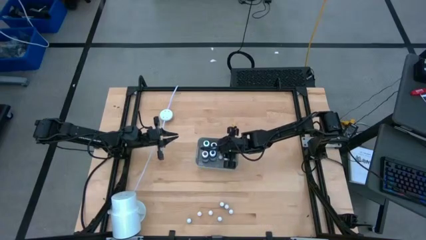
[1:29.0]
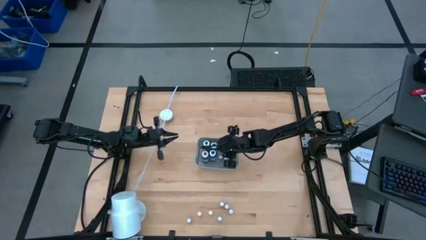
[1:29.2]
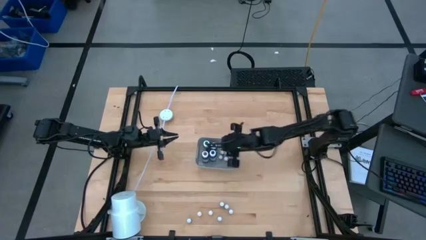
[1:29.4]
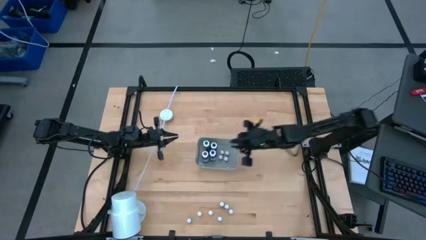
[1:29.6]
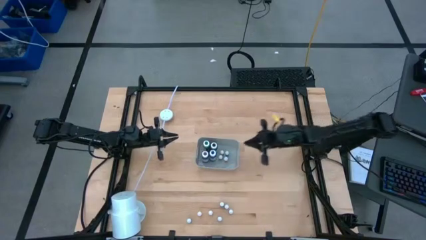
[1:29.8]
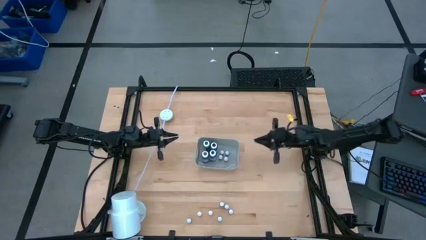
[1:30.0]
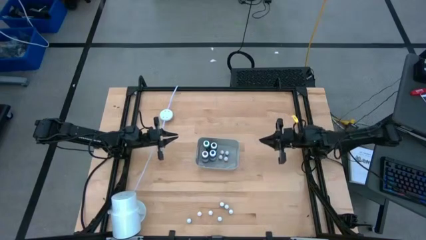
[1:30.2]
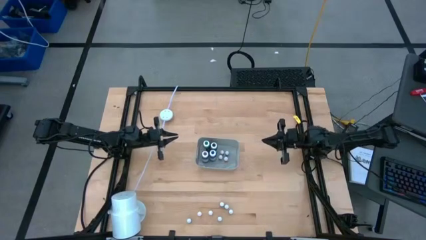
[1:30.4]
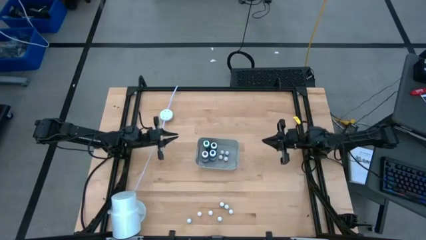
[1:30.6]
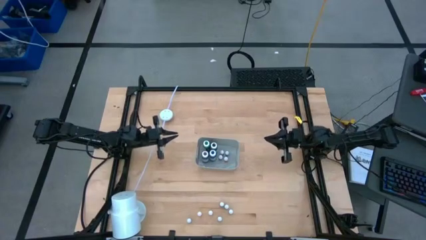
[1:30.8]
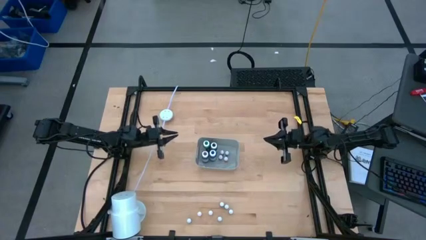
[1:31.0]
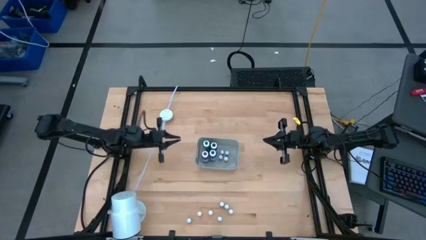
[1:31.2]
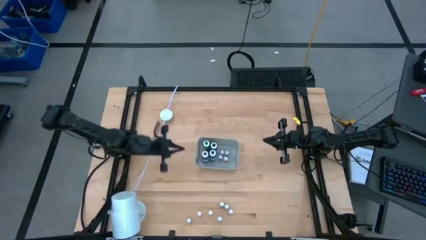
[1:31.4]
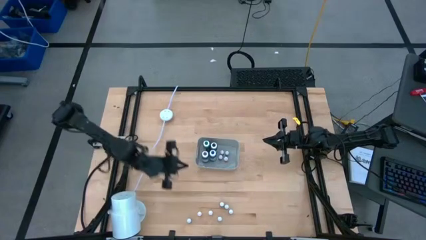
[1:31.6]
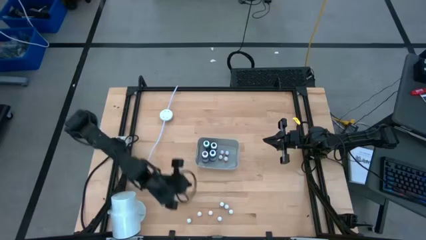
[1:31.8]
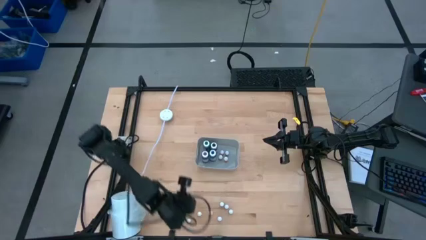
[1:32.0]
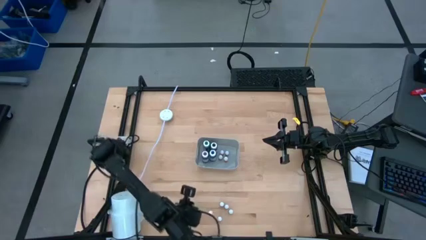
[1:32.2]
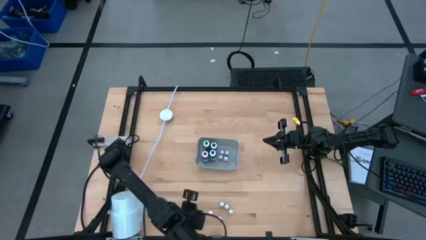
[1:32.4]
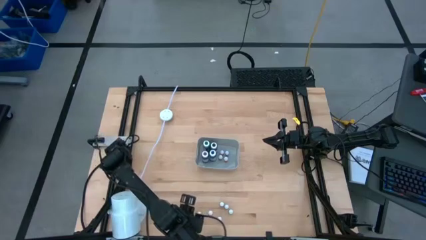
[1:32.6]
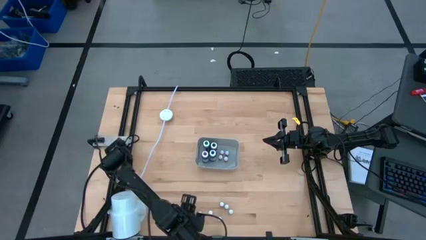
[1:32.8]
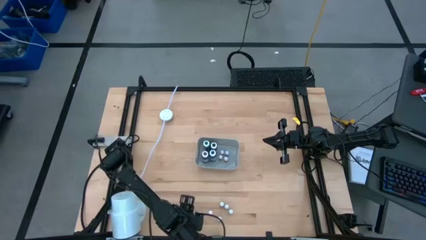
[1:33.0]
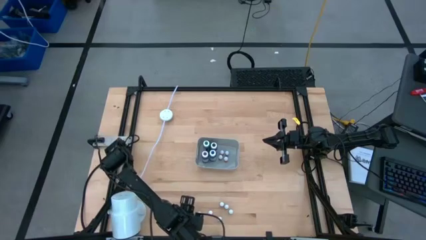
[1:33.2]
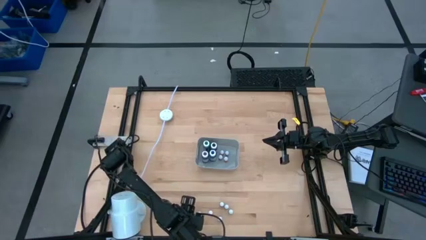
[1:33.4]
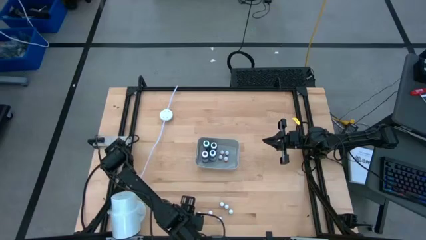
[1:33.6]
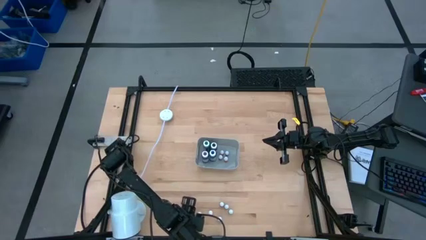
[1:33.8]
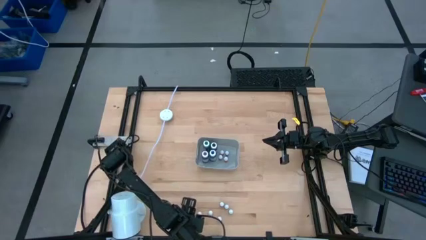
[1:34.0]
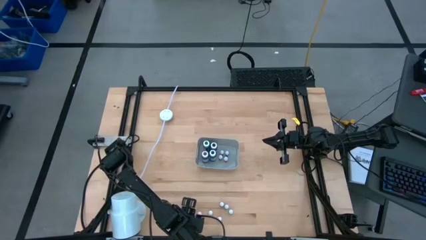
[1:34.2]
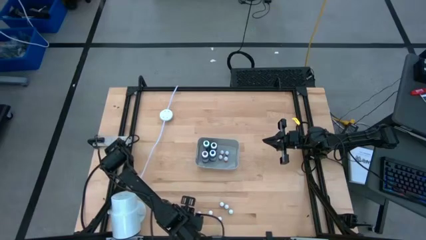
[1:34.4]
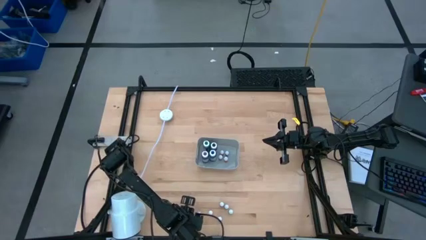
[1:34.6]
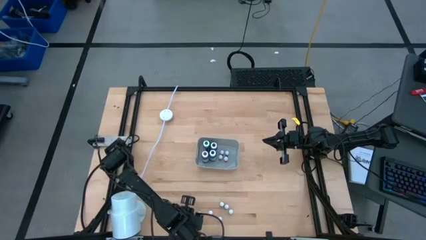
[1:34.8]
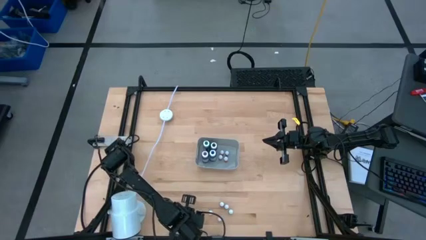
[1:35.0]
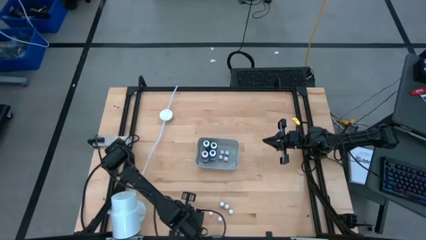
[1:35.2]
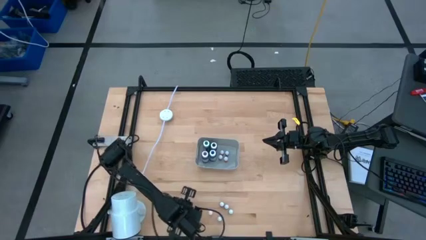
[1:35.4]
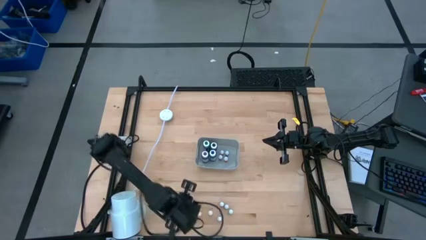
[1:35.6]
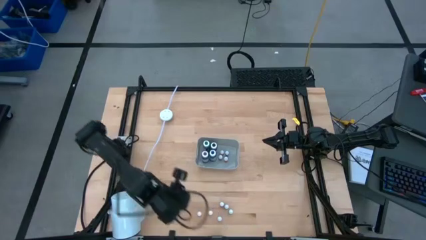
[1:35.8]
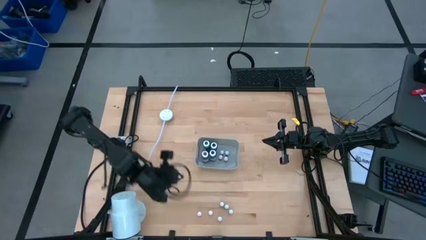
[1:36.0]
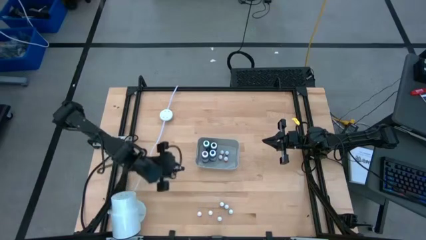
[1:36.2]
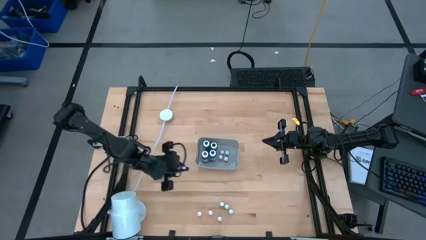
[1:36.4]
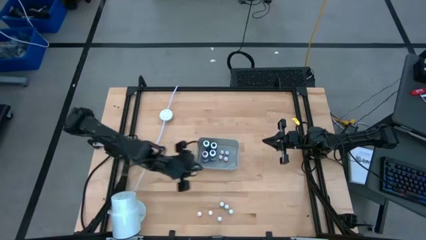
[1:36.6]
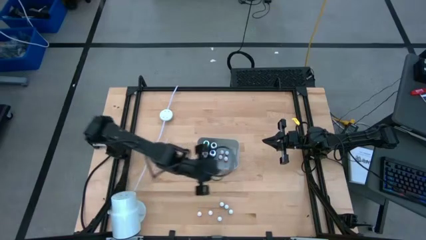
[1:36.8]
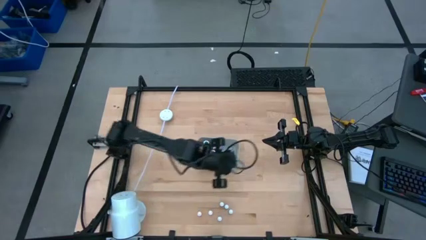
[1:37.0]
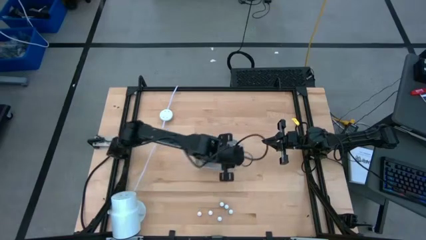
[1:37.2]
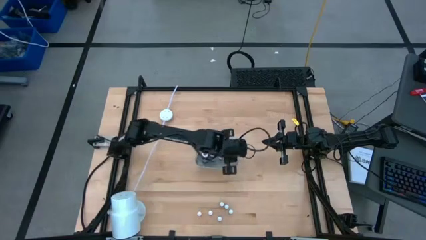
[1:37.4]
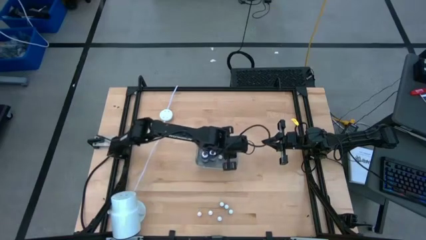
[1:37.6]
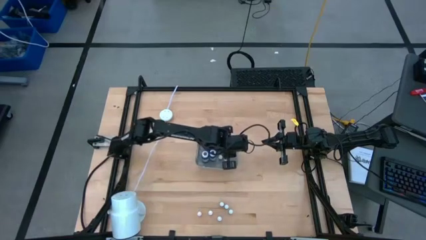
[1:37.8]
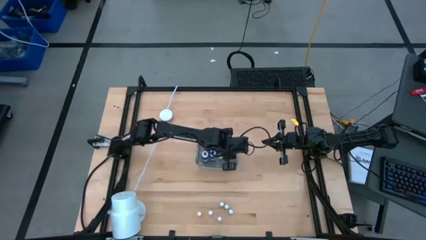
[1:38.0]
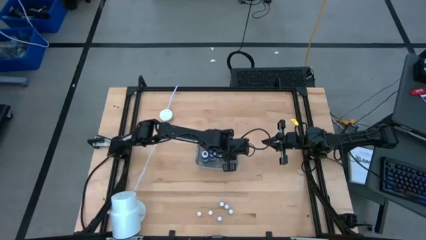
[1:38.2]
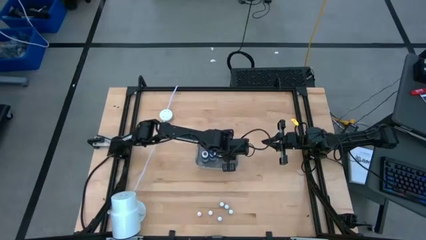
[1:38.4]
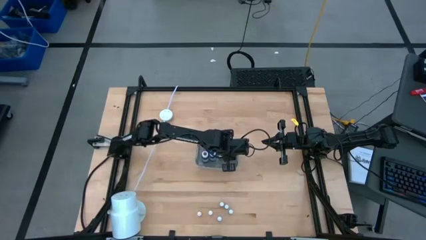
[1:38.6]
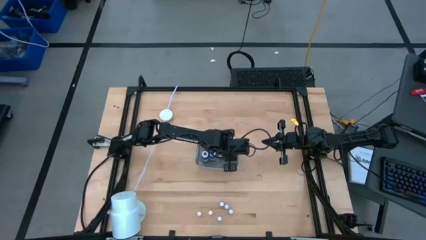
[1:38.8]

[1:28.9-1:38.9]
Task: Pick & Place food coloring
Put the small blue food coloring bottle into the gray container

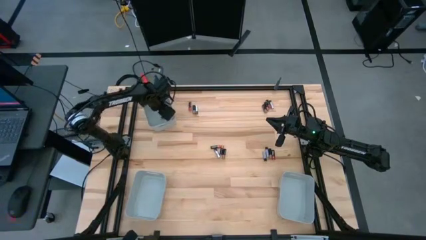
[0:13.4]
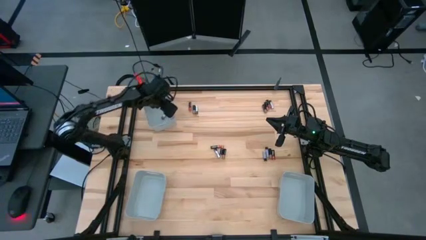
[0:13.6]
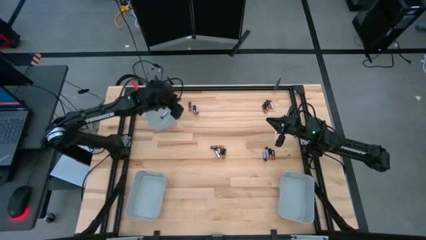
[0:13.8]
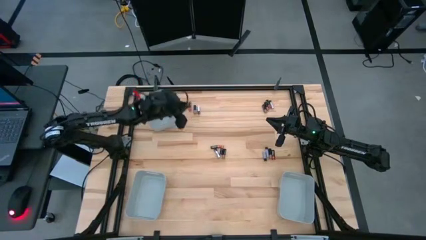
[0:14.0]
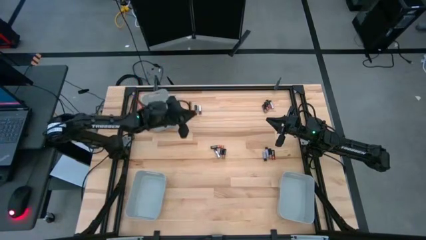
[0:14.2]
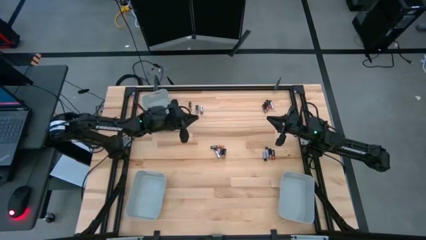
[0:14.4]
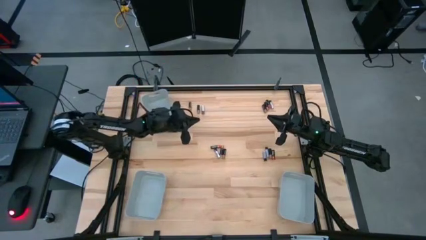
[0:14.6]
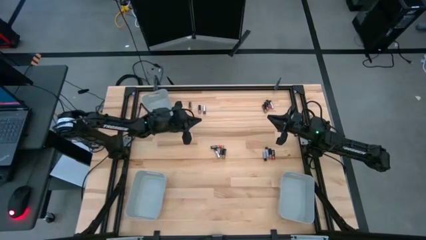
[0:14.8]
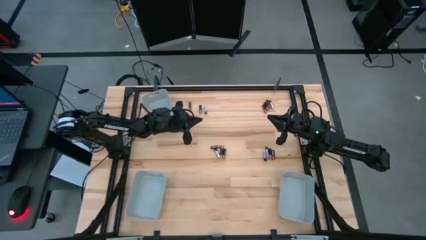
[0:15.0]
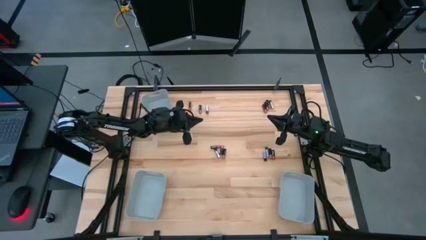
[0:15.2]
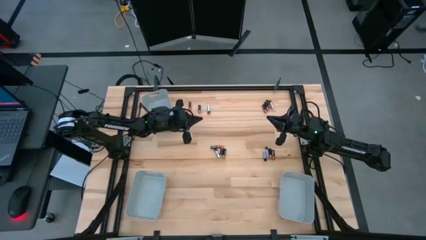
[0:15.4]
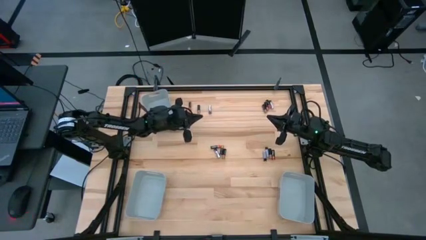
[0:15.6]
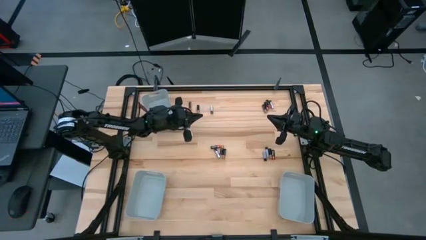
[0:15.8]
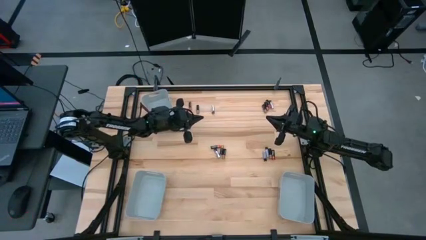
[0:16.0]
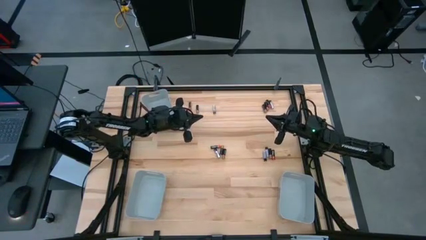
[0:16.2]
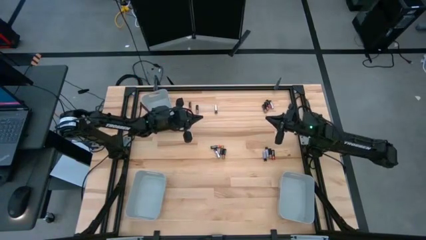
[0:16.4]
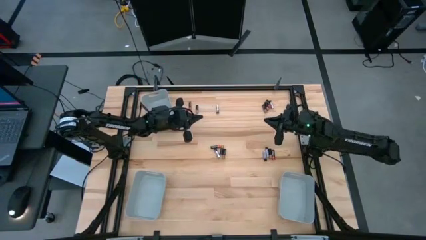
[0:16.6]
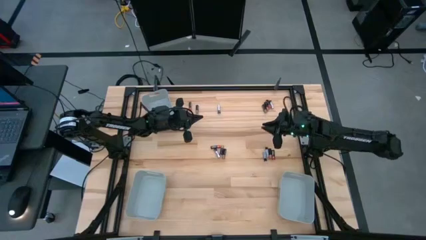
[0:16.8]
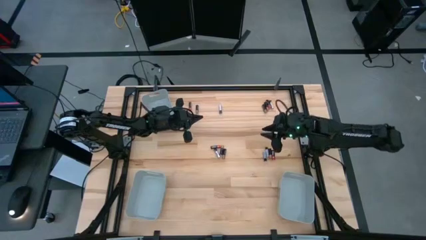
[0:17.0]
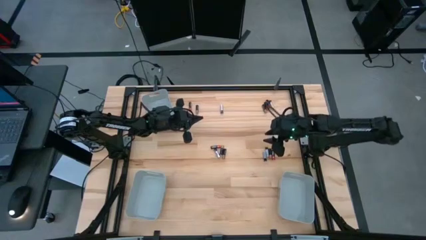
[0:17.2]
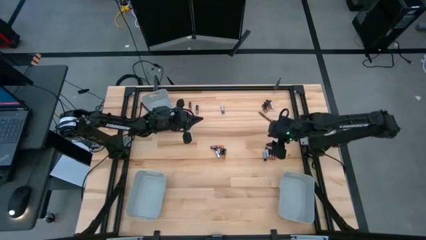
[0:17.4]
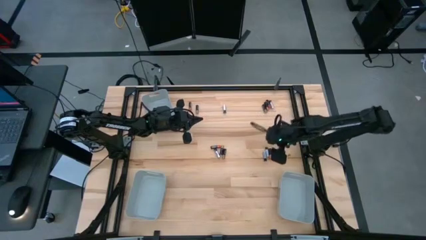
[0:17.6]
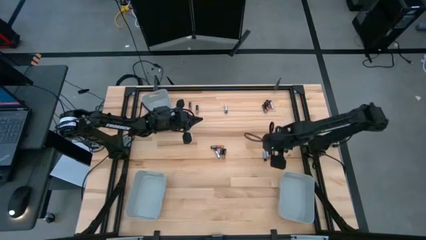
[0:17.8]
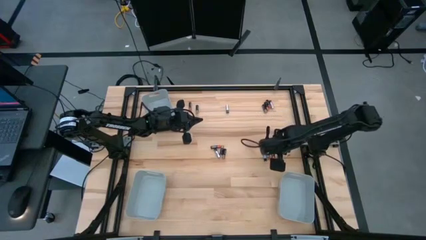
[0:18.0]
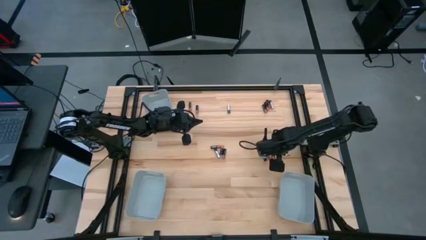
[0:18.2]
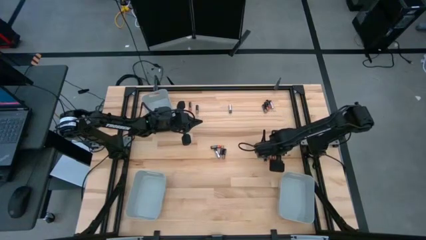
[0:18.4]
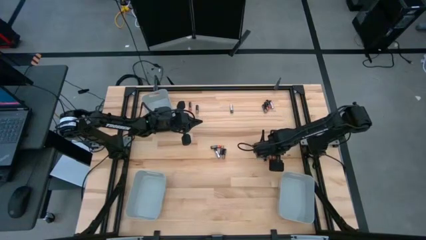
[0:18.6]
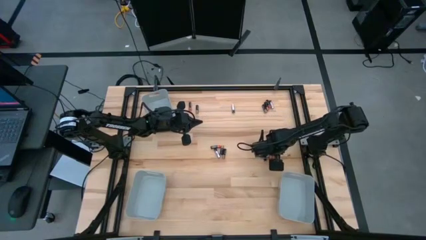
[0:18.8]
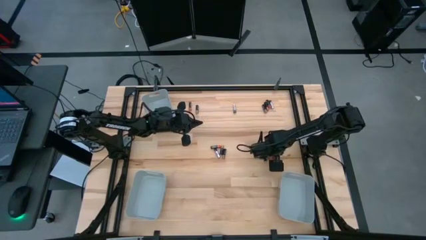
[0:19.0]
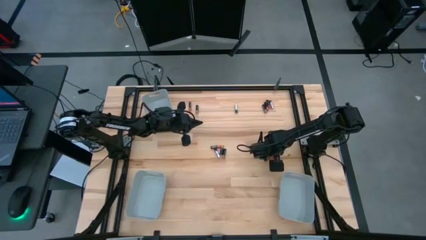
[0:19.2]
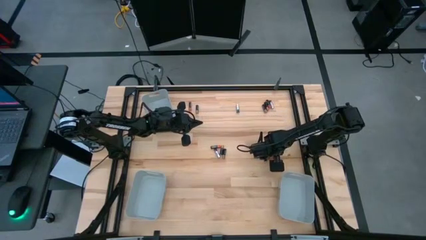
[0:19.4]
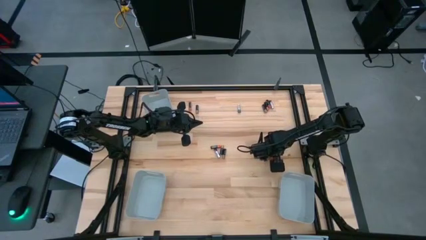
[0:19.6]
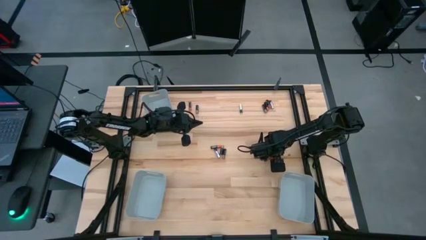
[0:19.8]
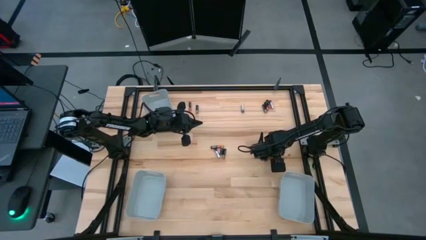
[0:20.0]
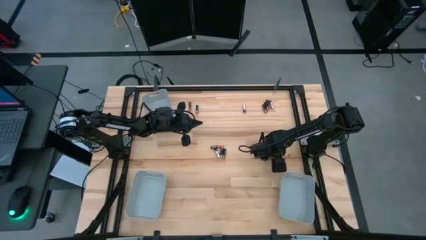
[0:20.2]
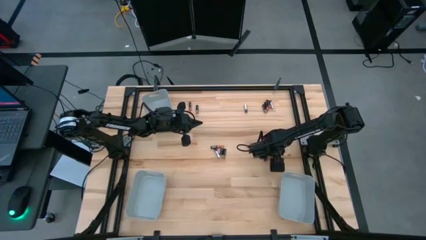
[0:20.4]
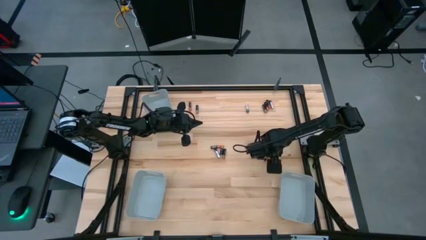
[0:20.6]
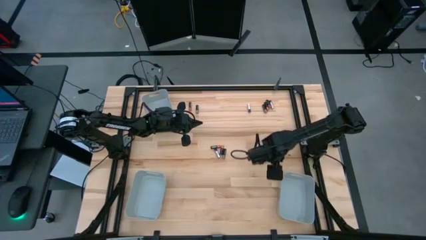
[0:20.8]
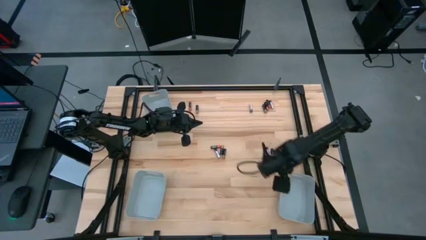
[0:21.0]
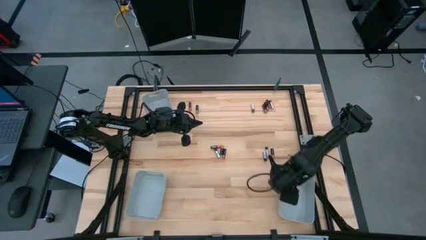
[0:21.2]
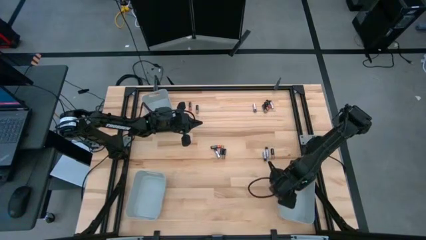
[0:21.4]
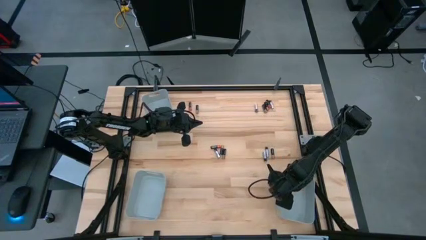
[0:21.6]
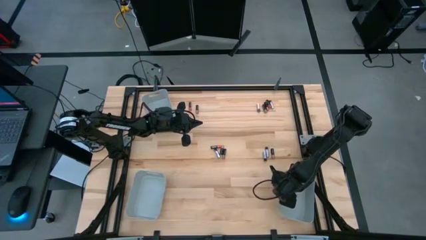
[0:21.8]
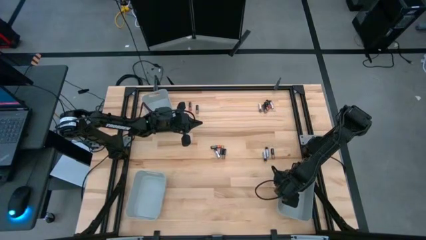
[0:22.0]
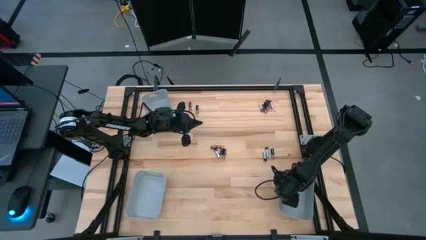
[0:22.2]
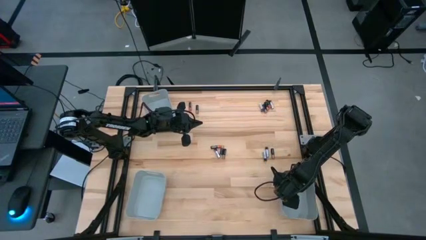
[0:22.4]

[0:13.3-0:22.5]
Task: Sort batteries
Put the black-red battery into the bottom right gray bin
